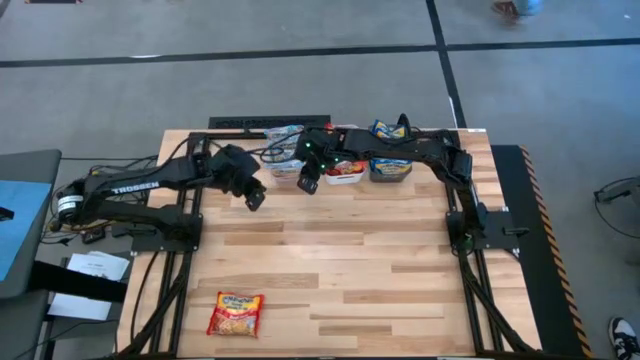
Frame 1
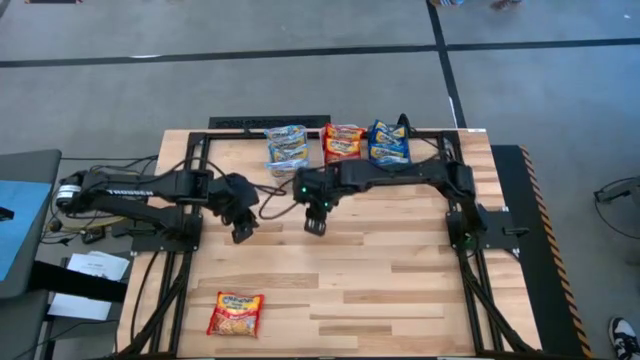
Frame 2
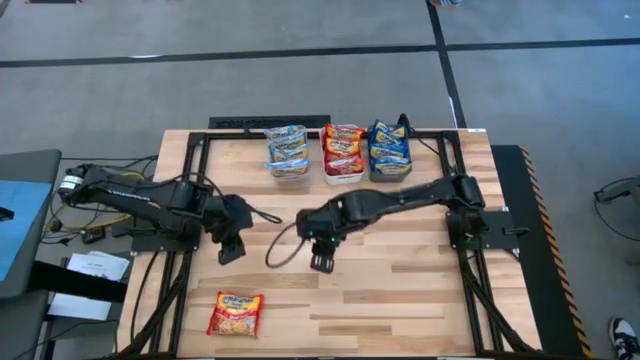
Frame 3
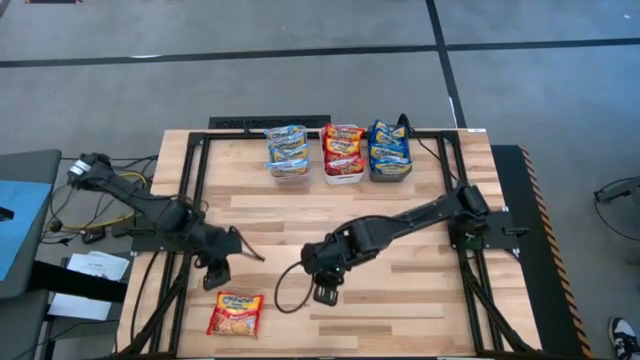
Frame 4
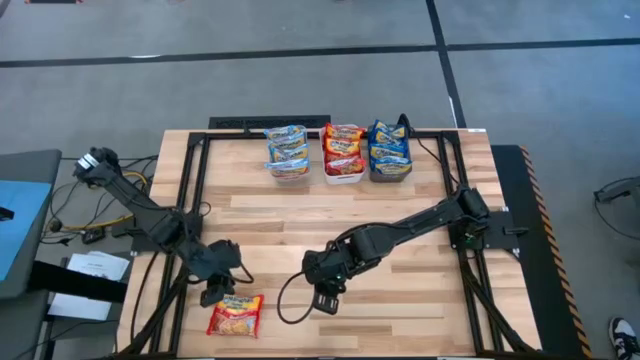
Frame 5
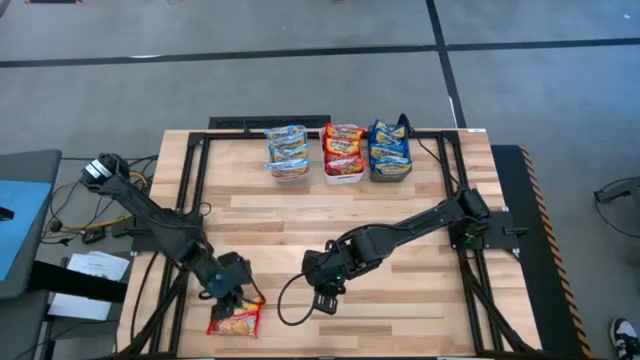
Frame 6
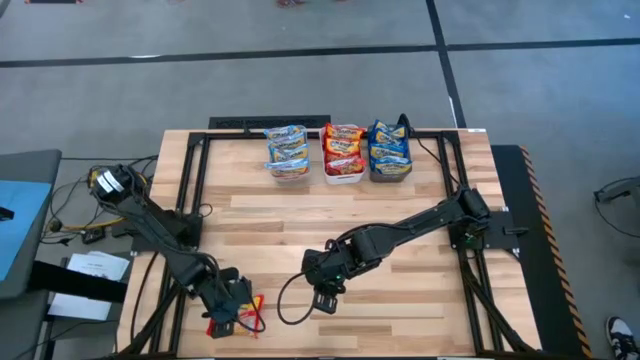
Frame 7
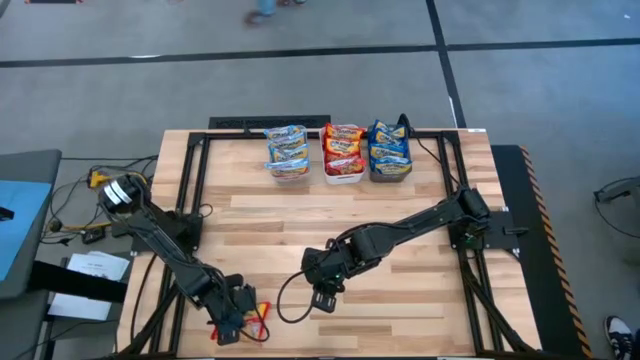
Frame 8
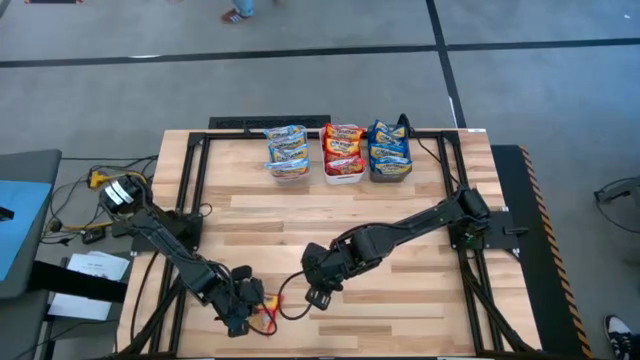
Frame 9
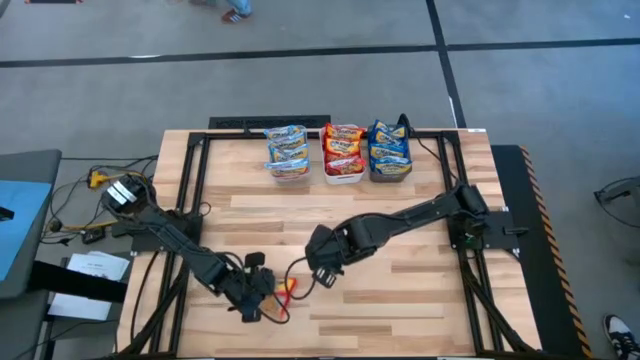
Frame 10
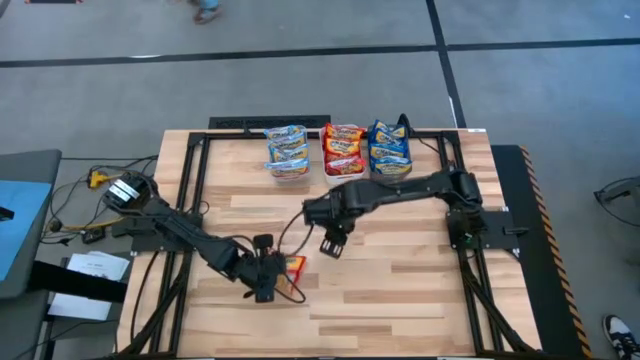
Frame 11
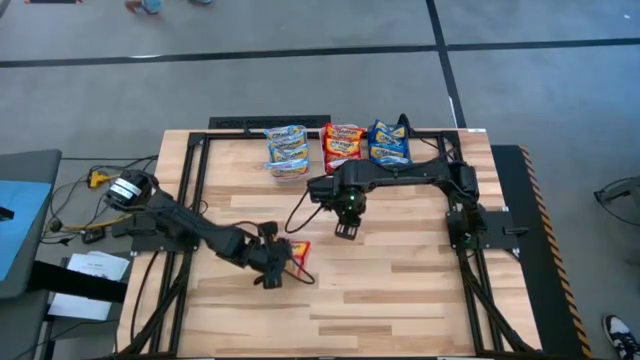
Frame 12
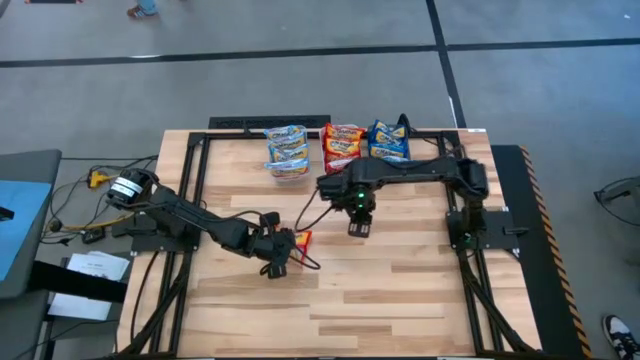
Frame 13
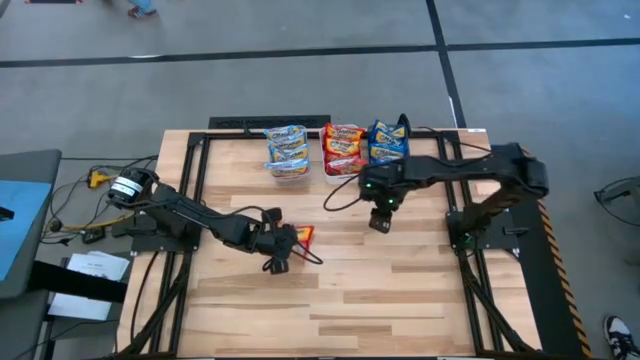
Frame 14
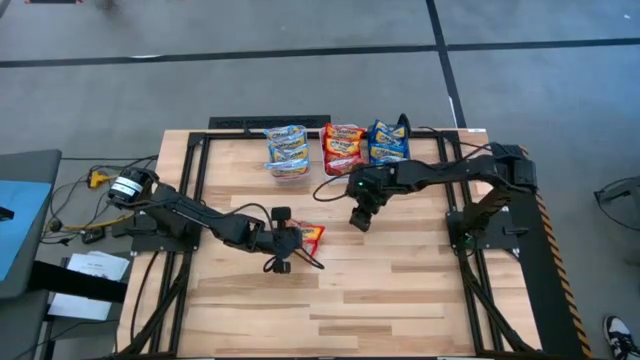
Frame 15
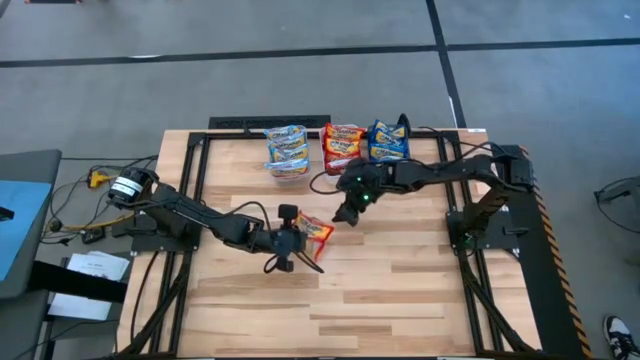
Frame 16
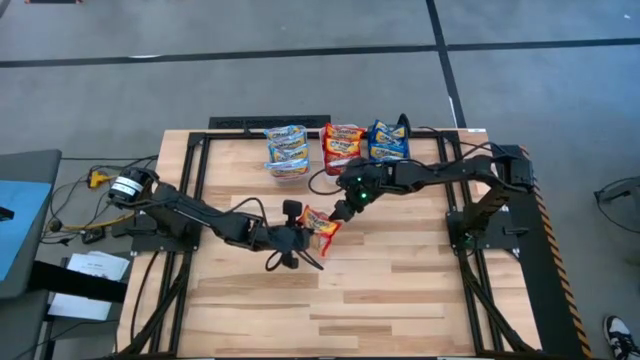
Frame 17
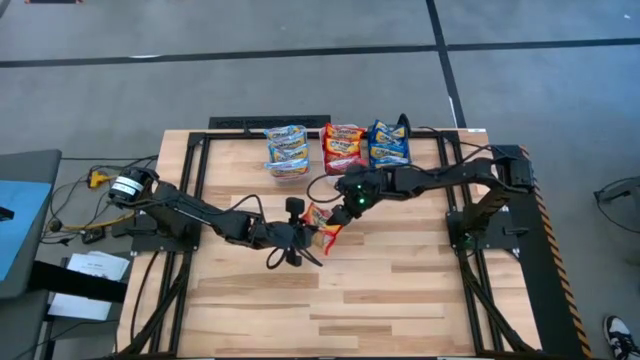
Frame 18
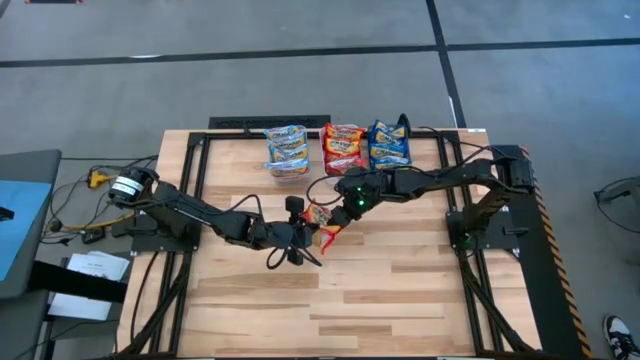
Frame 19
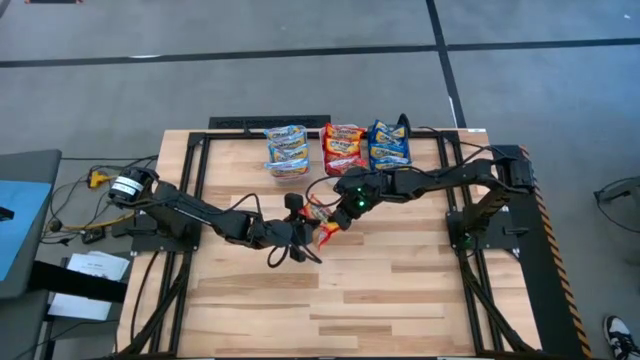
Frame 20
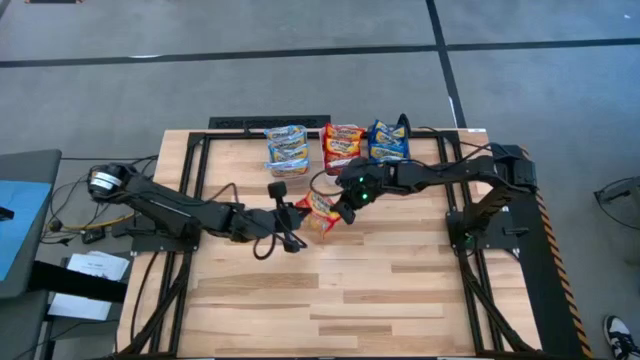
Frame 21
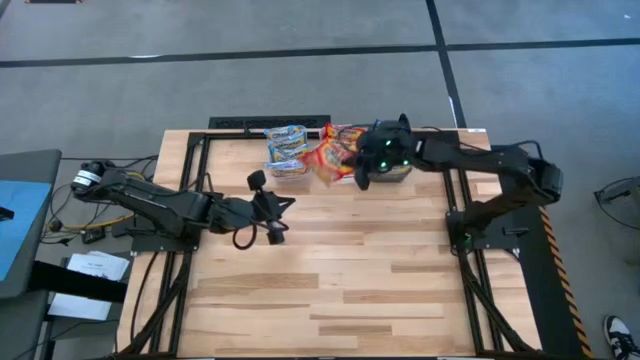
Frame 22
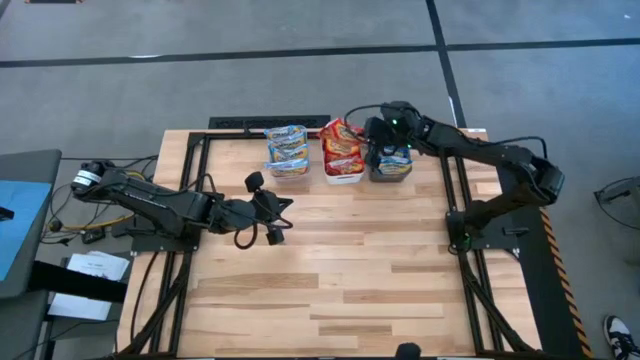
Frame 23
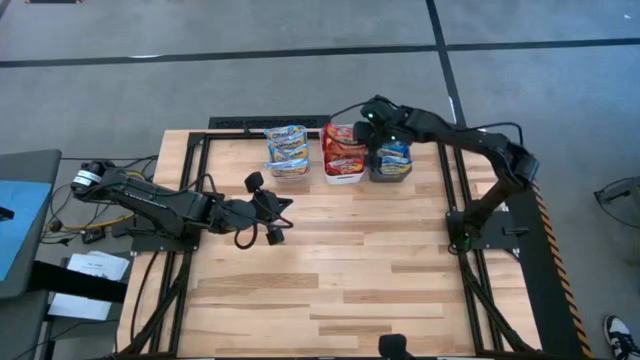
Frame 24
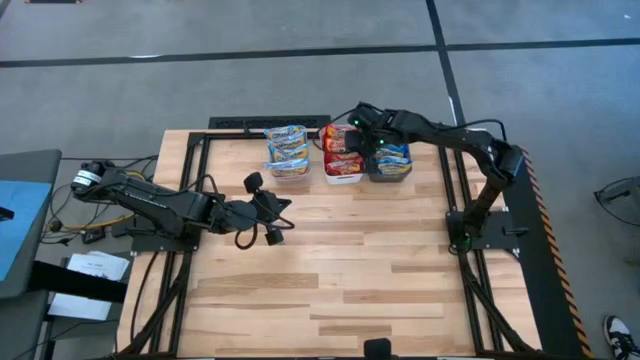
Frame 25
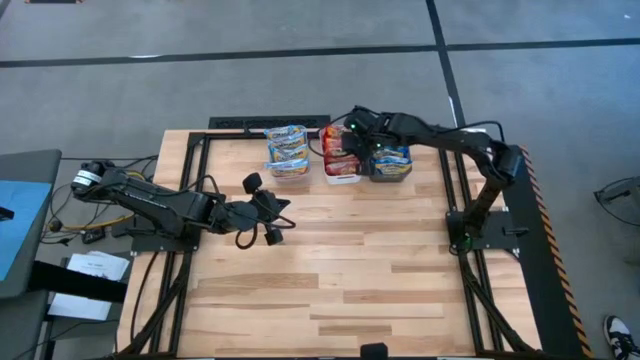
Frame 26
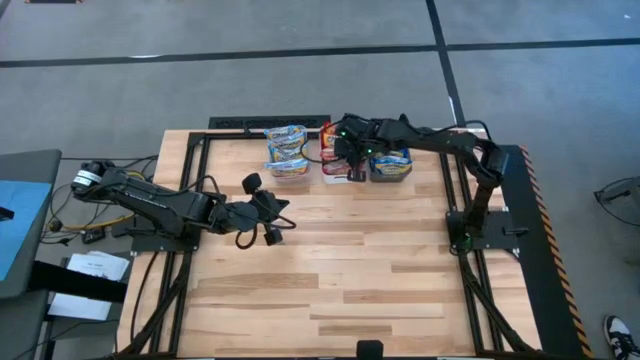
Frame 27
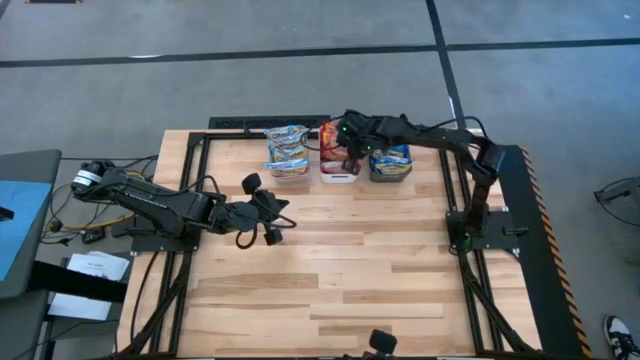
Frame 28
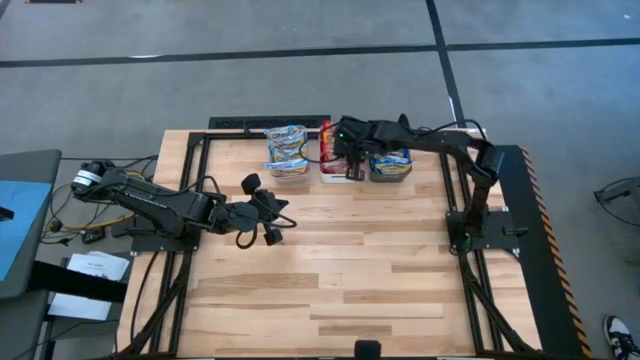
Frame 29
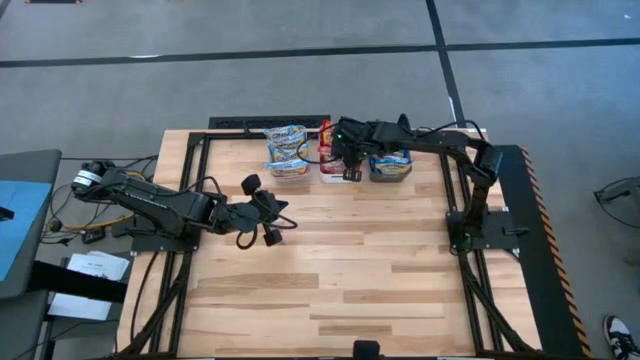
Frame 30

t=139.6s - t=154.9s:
Task: Sort Maruchan noodles
Put the red noodle pack into the white bin

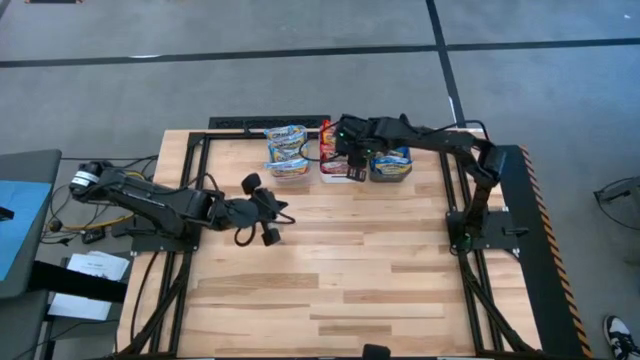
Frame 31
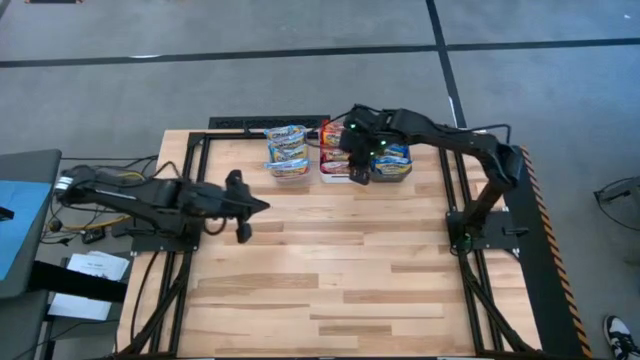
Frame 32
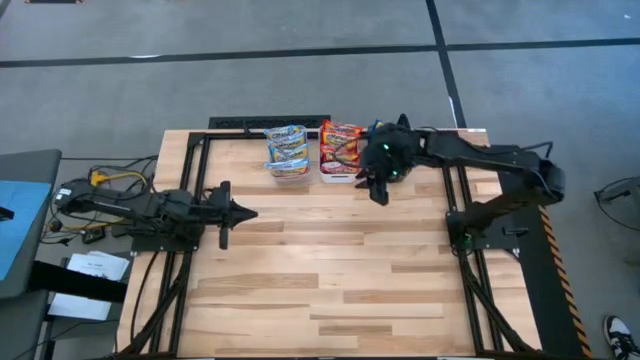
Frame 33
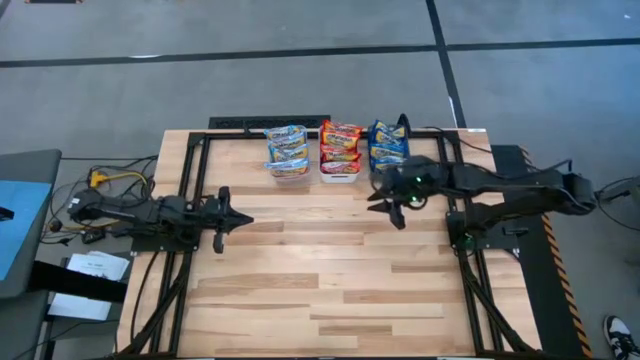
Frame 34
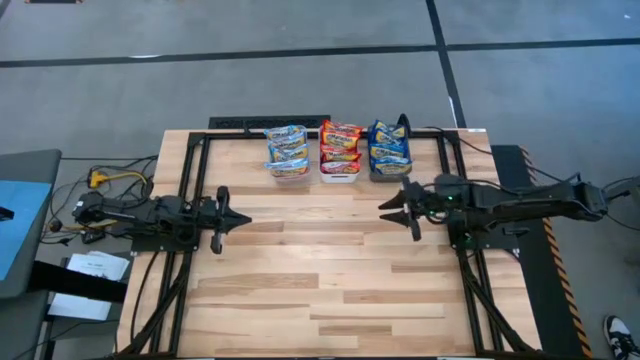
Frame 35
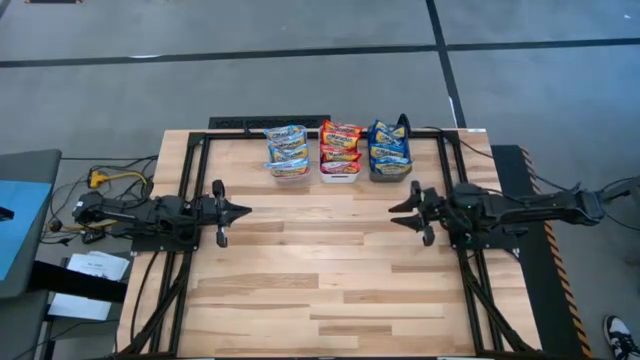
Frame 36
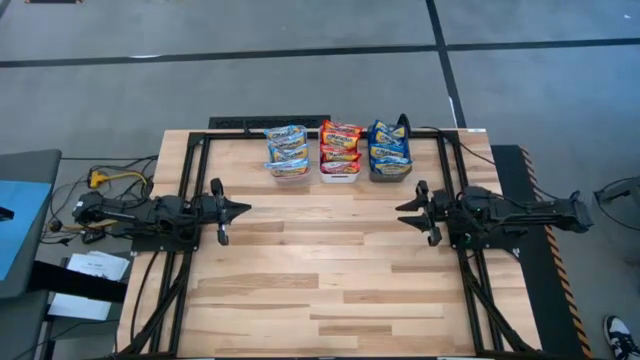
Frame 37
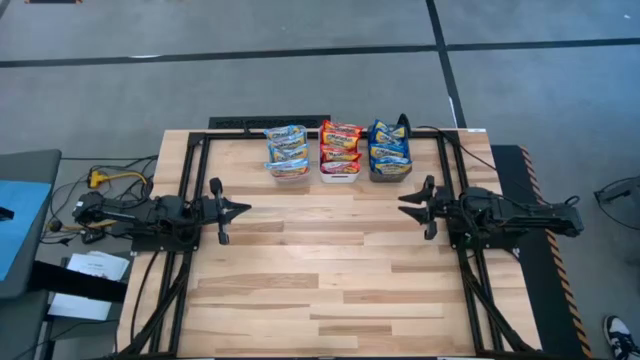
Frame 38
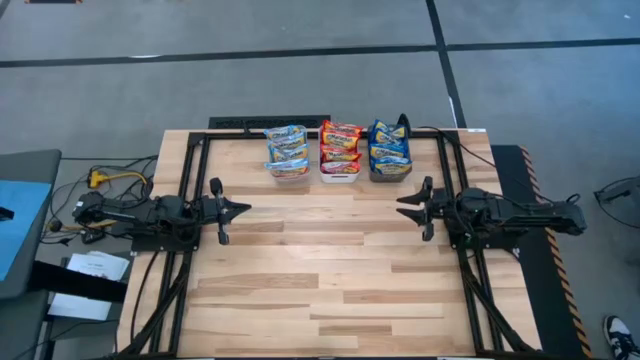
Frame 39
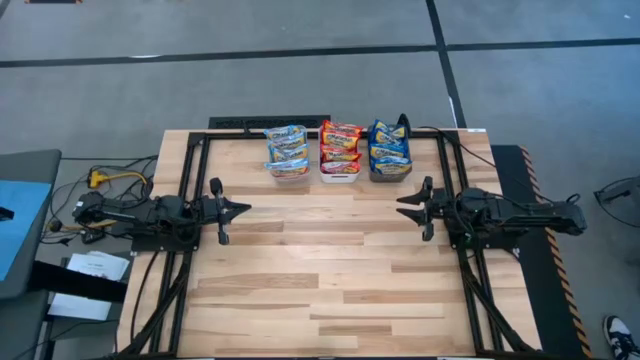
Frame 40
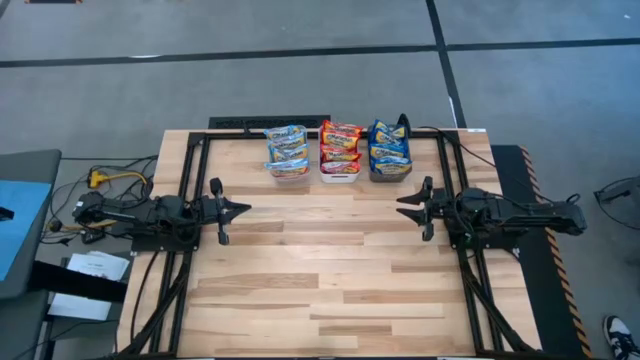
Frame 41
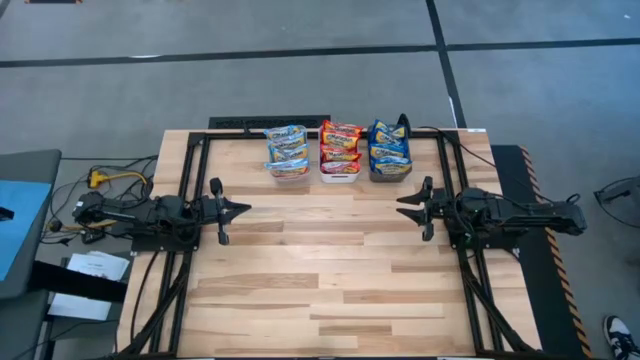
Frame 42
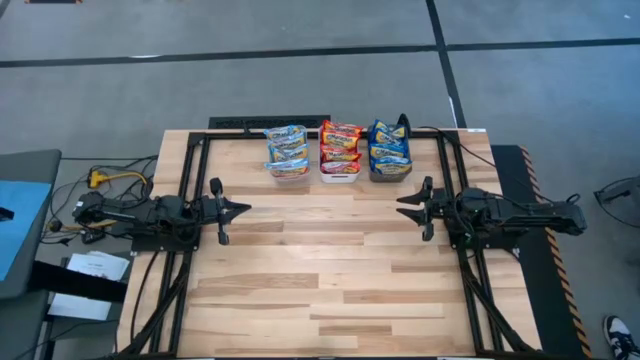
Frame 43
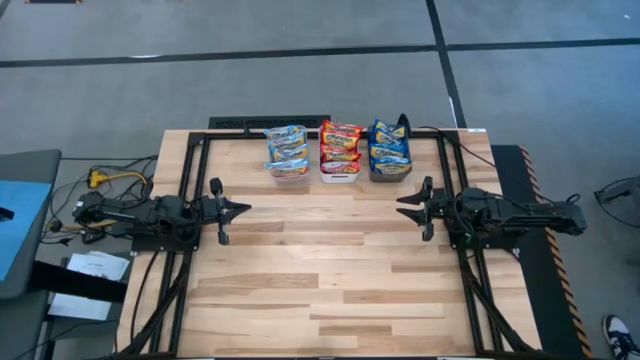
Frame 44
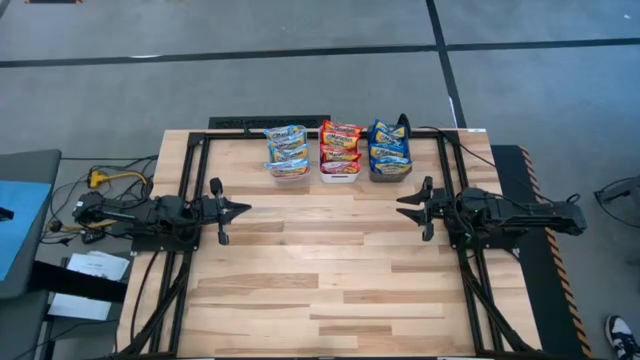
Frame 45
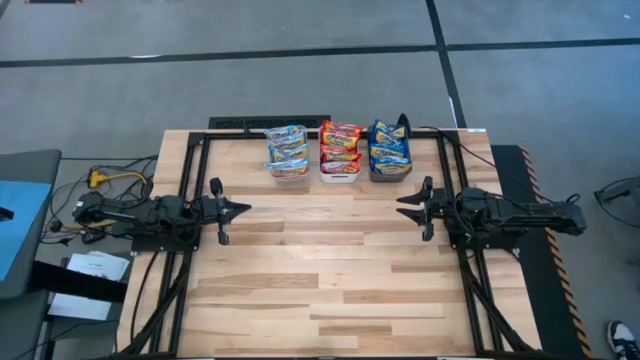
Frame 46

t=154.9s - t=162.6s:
Return to Home Position
